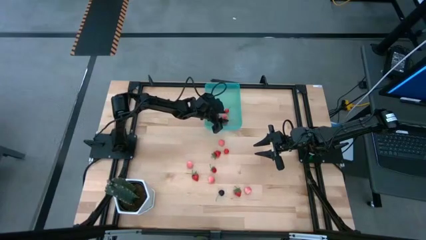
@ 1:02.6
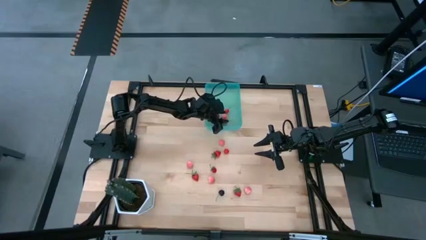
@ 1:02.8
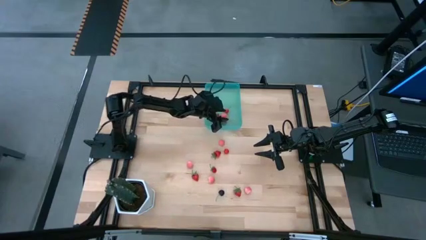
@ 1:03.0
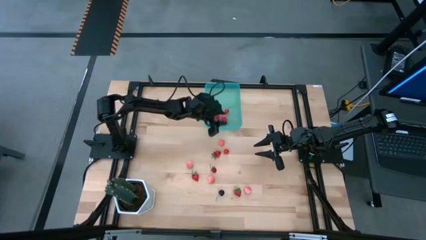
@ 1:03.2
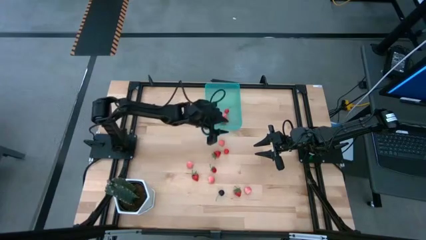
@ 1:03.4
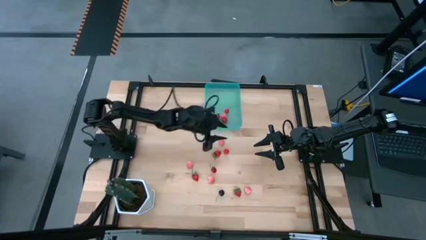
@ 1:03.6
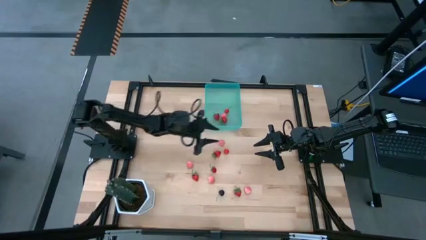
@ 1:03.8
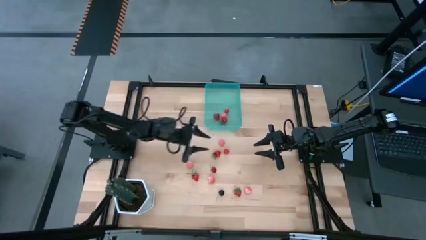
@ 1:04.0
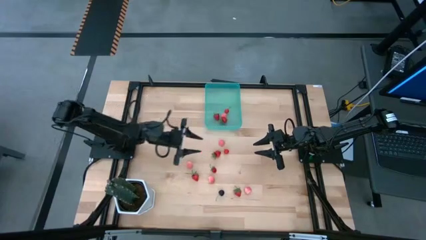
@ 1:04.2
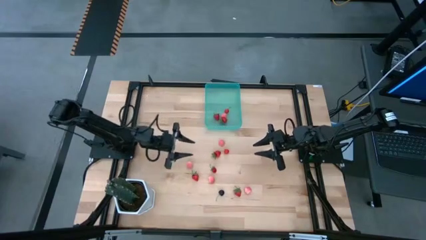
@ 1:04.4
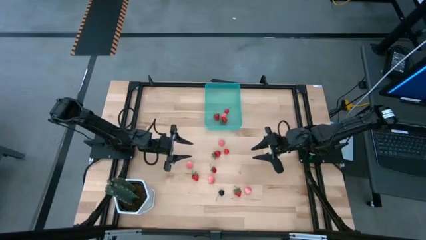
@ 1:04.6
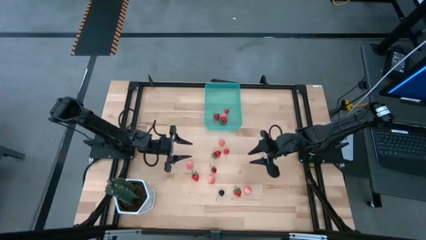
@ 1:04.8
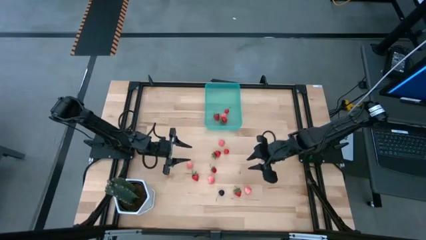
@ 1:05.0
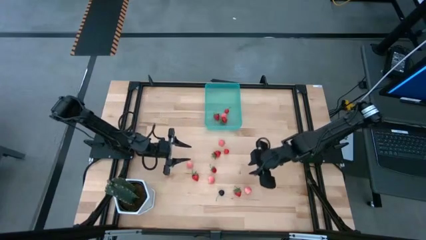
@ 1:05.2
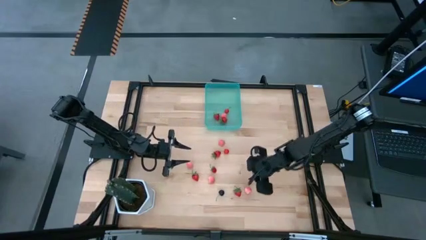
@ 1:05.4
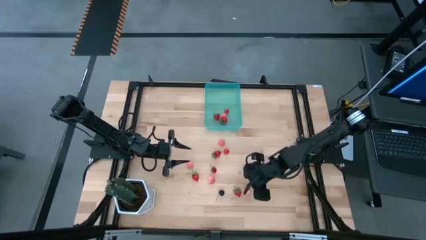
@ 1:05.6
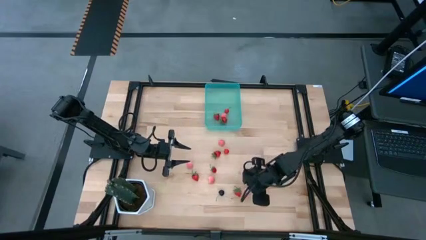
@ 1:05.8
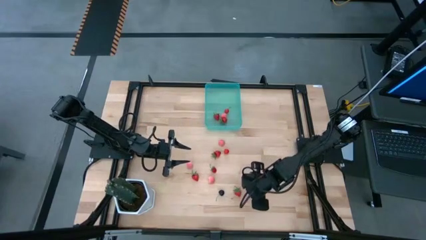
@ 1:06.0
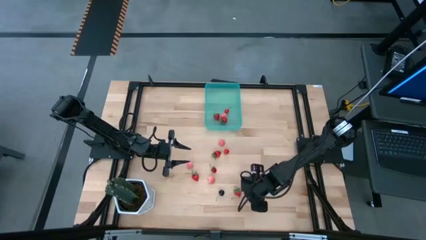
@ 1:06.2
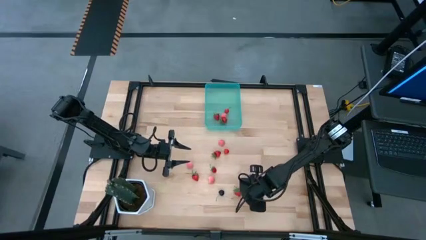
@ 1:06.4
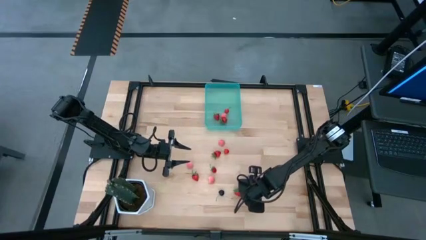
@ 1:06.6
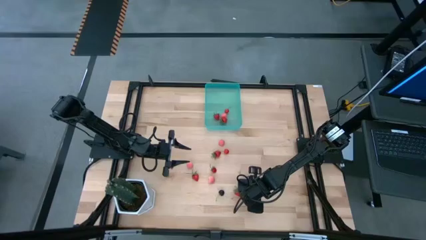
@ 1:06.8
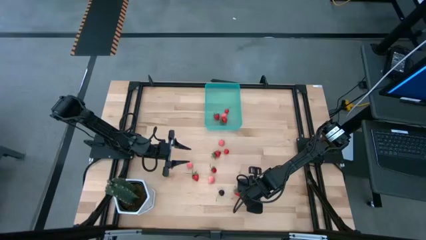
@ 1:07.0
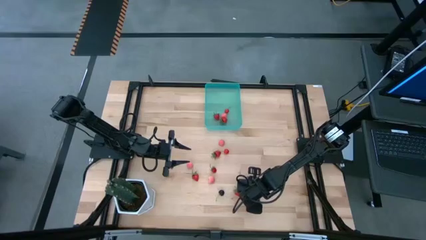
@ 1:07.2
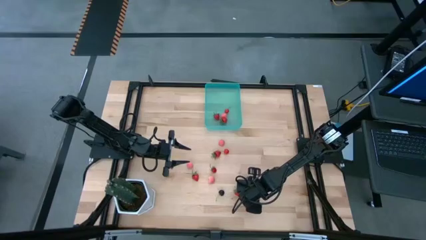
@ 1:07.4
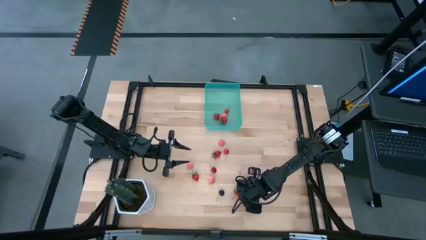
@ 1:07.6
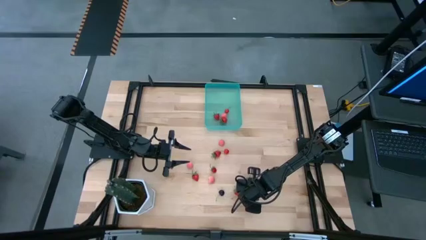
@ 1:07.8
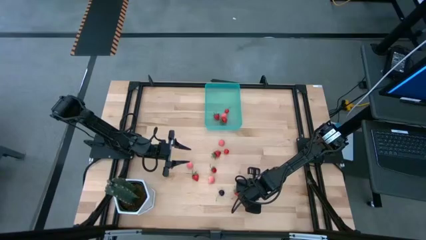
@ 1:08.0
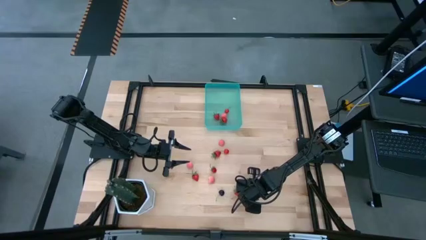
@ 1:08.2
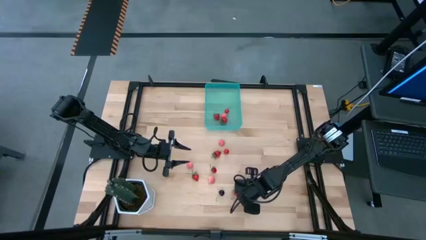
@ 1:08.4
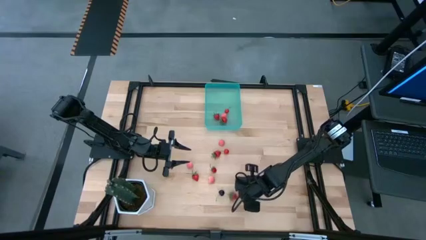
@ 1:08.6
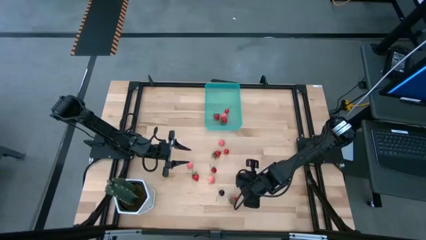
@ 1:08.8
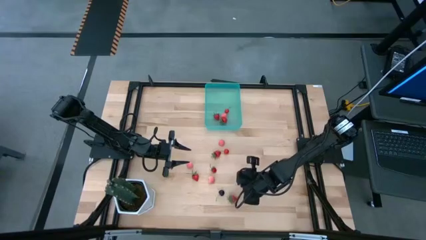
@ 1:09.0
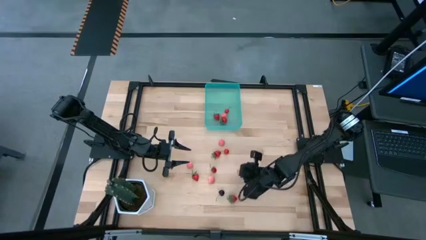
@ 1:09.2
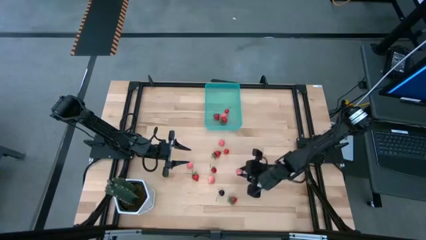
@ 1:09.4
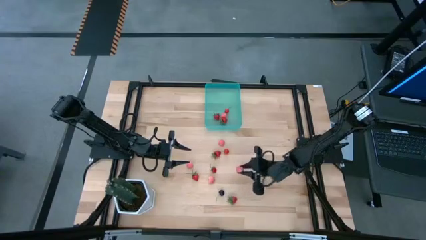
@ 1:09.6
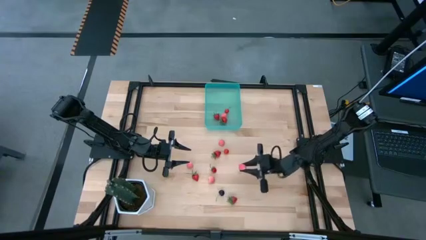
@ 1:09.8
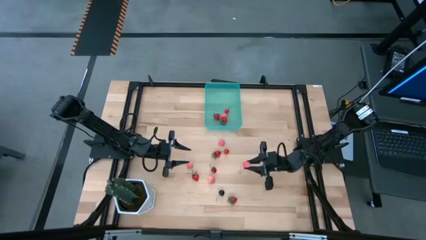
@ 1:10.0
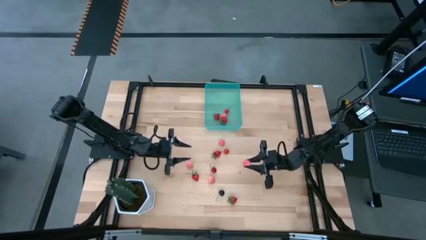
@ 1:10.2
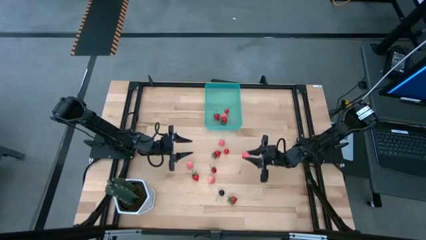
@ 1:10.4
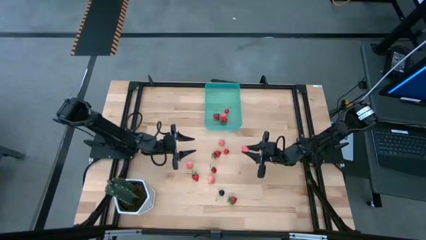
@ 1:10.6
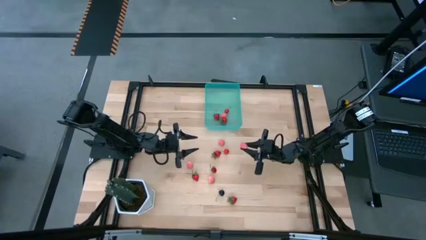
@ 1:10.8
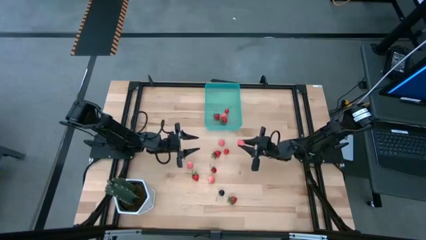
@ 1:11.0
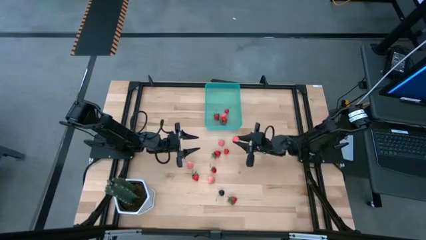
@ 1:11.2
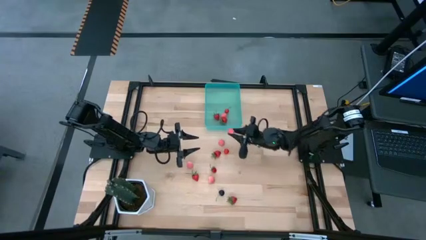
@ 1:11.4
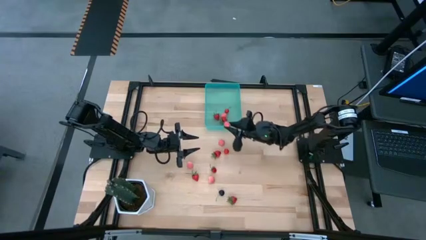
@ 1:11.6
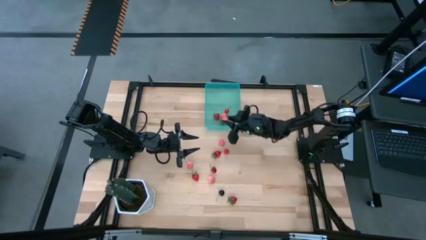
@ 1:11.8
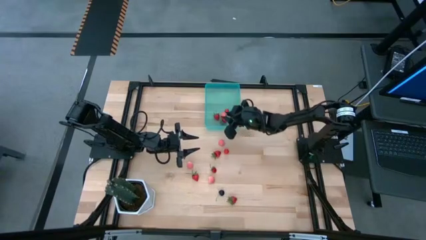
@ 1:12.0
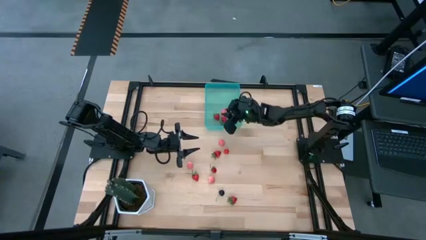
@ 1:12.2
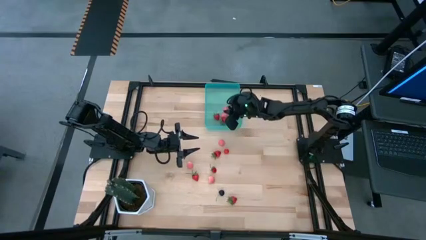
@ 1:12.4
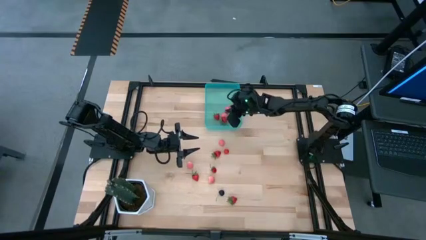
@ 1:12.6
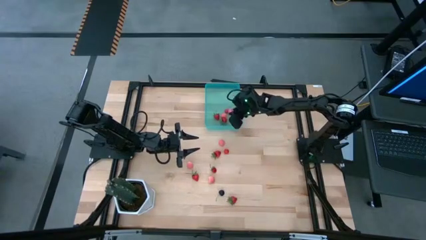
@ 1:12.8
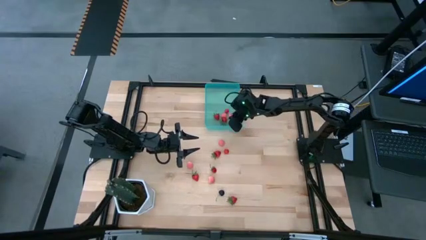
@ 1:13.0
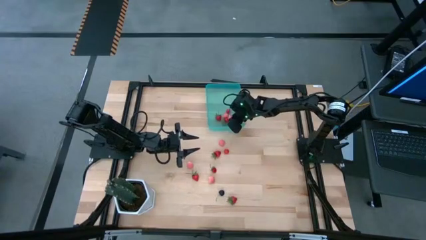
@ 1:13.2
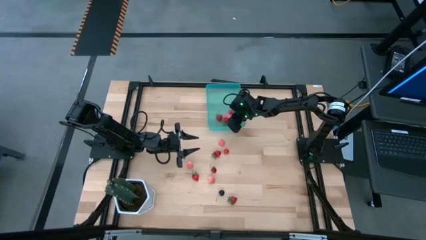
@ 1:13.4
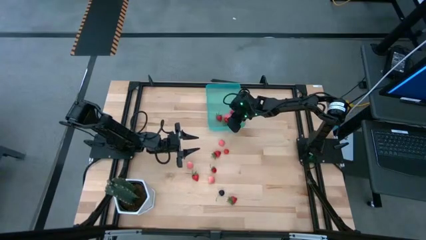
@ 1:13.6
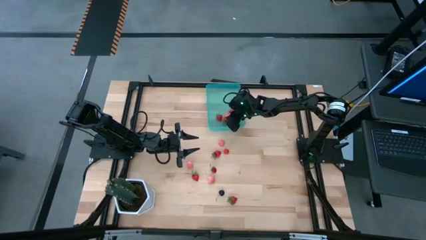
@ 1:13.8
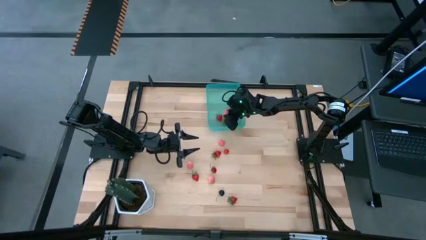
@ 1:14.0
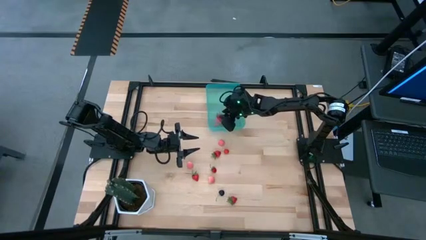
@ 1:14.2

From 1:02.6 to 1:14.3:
Task: Pick and placing Produce into tupperware
Put the pink peach into the blue bin

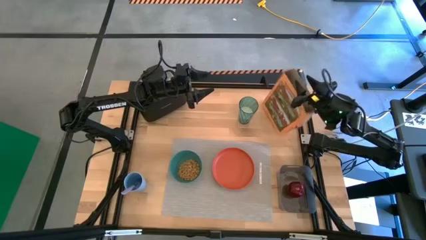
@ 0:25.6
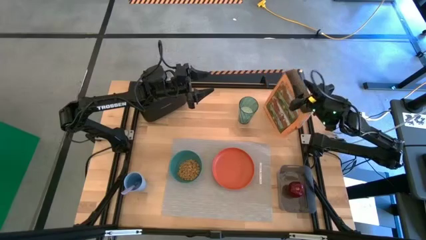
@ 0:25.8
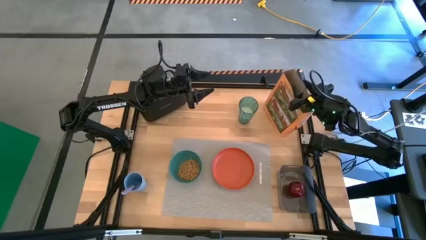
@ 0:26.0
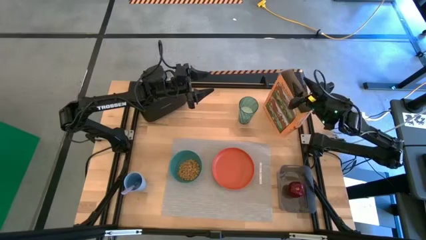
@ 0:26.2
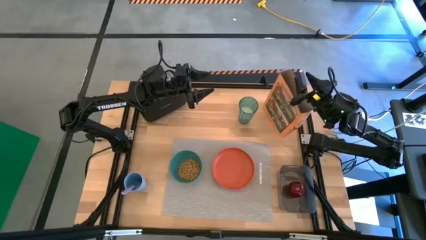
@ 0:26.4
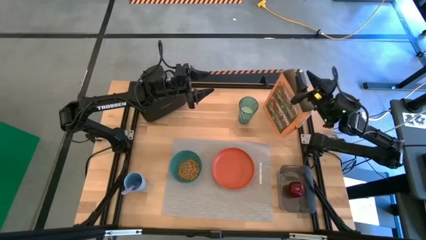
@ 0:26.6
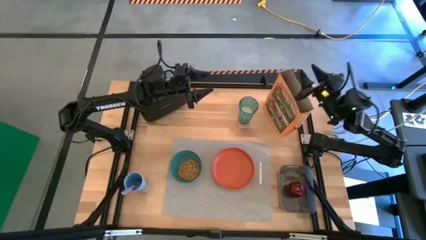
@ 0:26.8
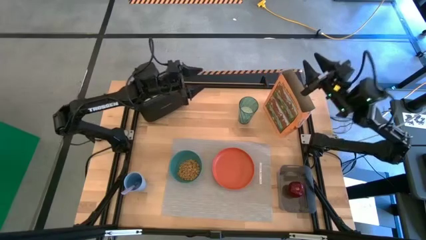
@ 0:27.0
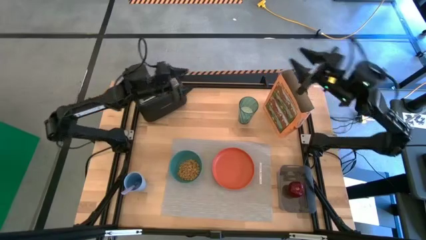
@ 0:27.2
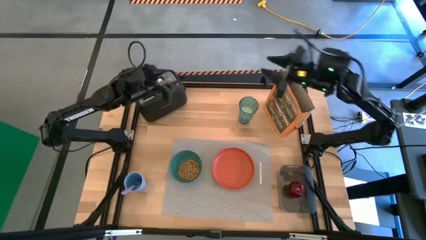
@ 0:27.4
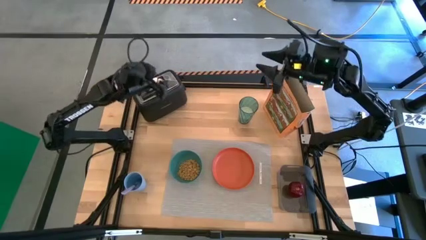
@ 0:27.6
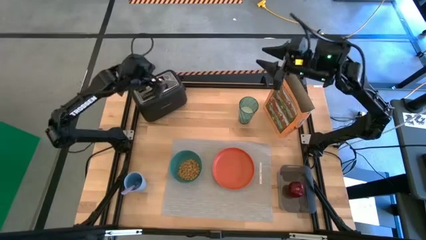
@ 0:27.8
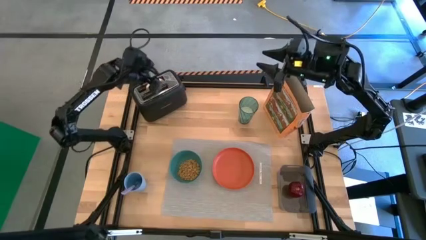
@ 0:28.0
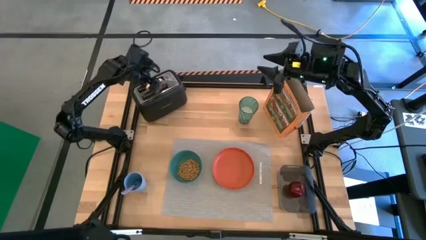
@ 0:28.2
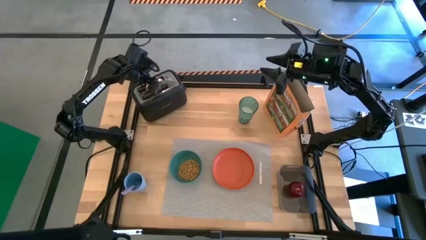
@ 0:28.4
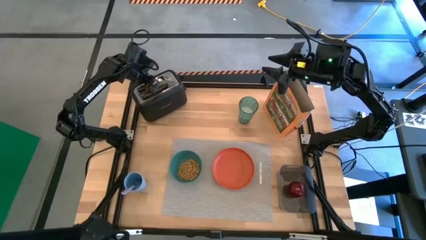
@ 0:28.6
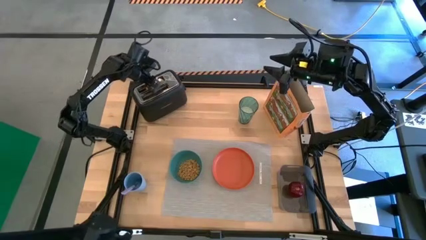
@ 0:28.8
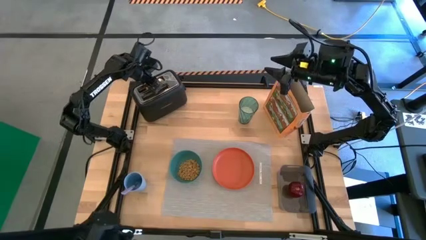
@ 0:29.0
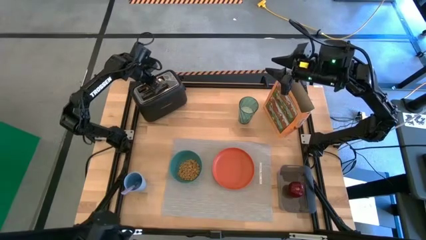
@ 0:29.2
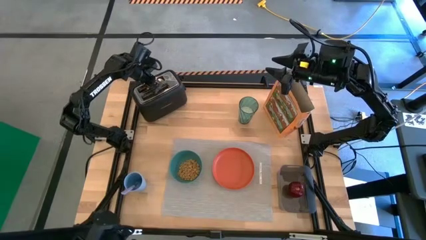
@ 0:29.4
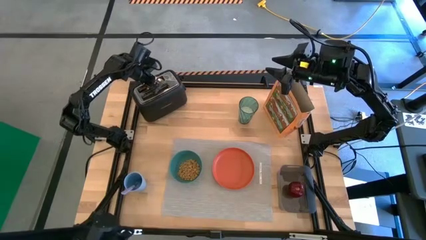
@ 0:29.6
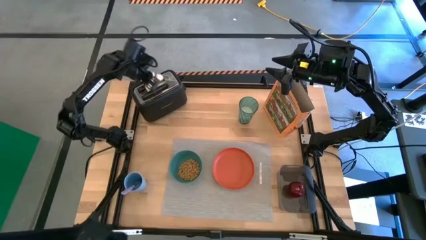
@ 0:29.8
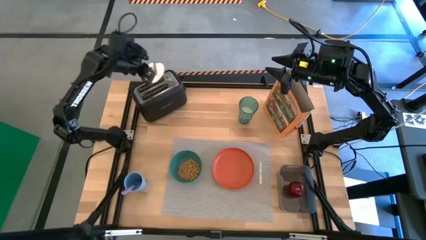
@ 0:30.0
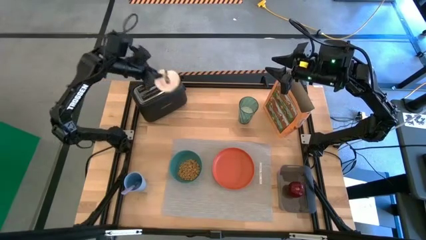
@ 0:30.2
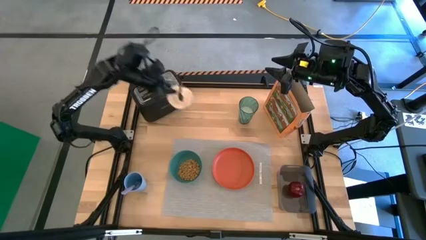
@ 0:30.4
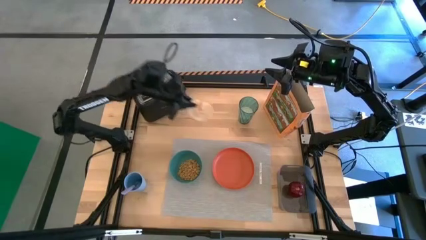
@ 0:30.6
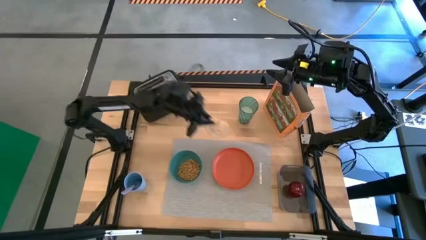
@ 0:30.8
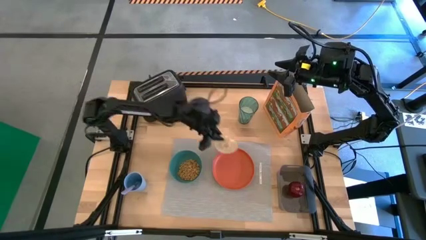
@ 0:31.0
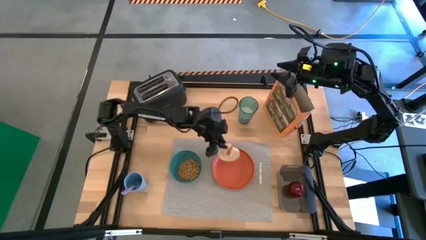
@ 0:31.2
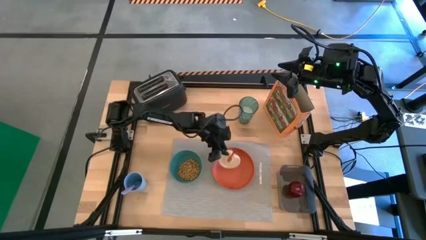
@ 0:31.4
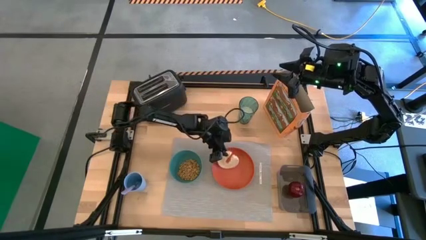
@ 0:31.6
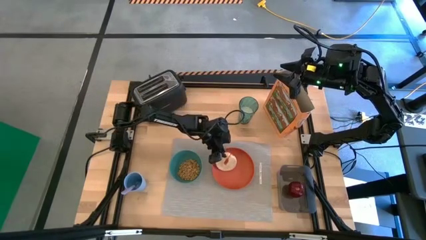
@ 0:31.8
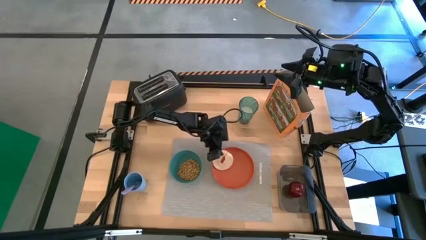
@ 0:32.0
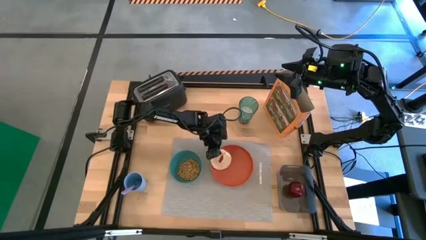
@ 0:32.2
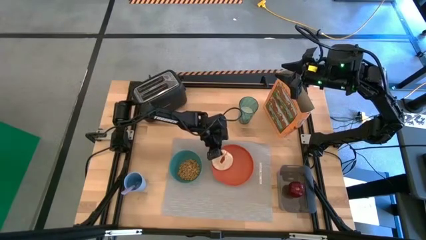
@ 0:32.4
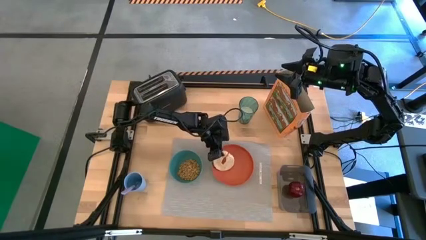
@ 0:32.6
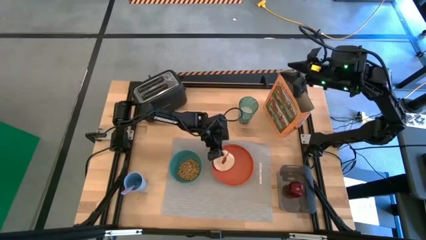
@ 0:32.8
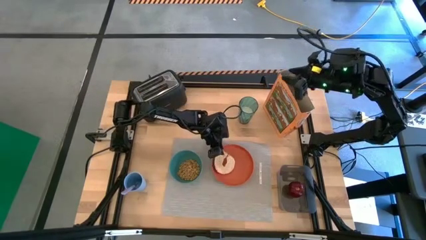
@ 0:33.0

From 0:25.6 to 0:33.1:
Task: Arrange a breakfast setting
Put the toasted bread from the toaster into the orange plate
